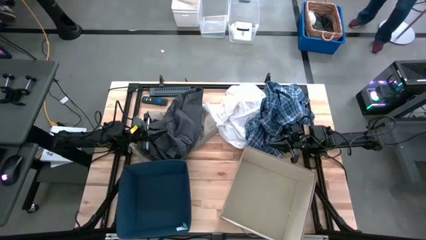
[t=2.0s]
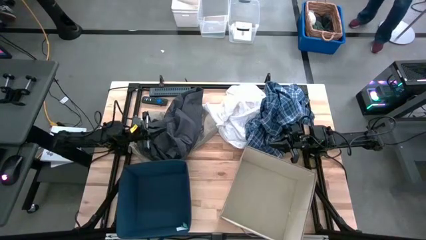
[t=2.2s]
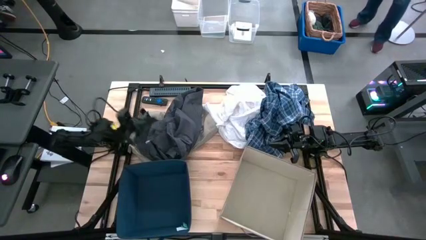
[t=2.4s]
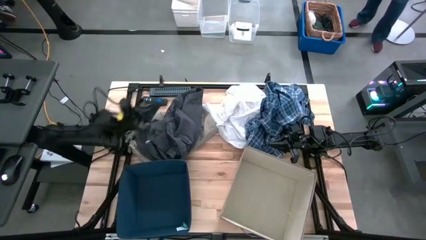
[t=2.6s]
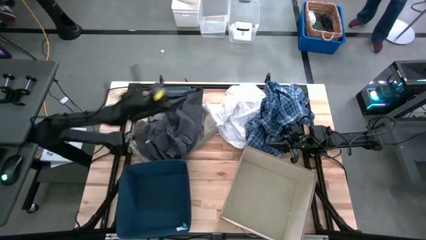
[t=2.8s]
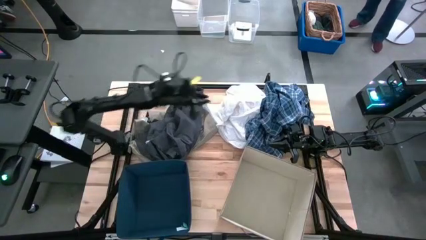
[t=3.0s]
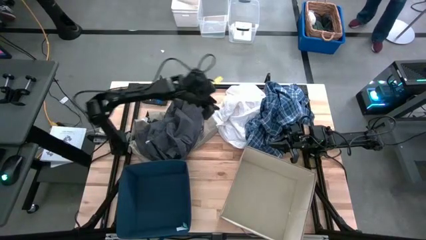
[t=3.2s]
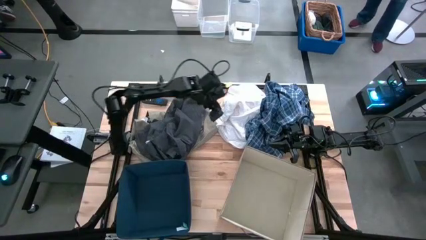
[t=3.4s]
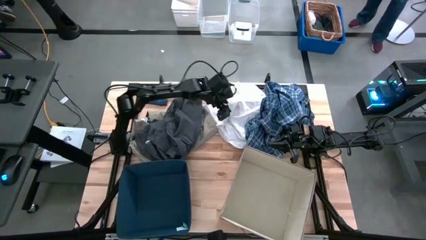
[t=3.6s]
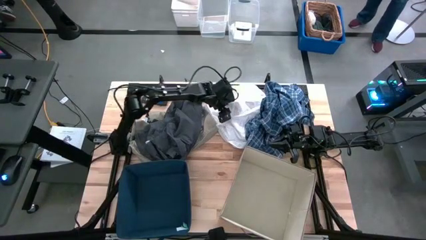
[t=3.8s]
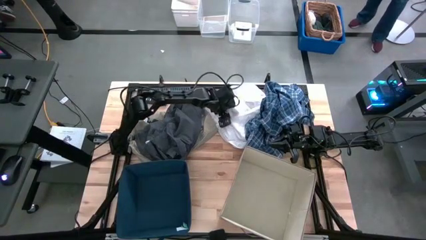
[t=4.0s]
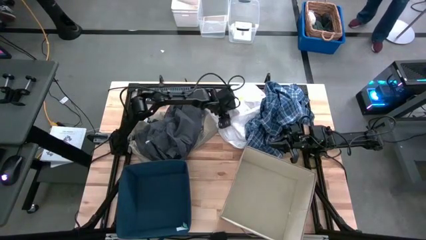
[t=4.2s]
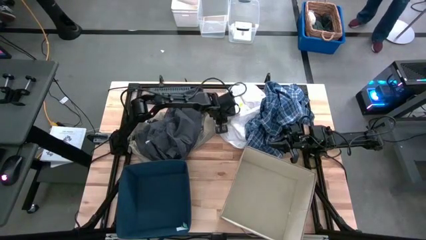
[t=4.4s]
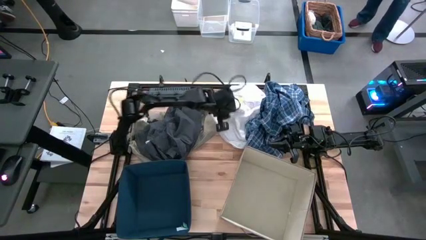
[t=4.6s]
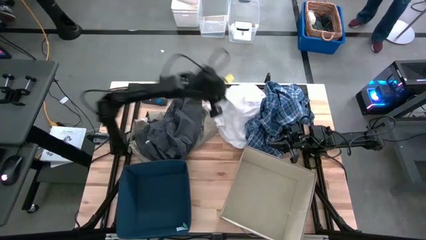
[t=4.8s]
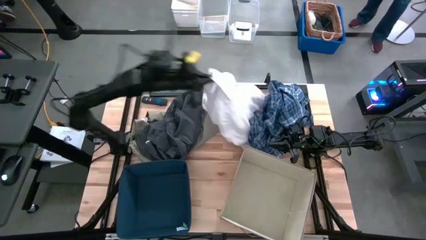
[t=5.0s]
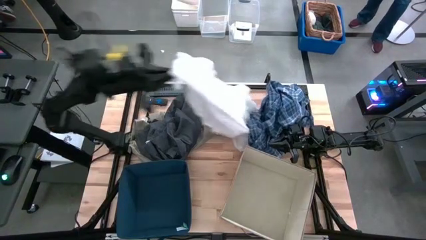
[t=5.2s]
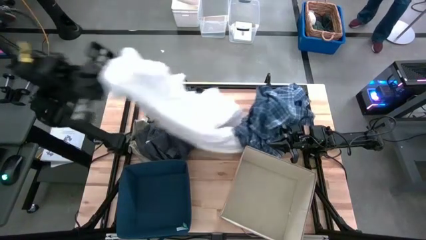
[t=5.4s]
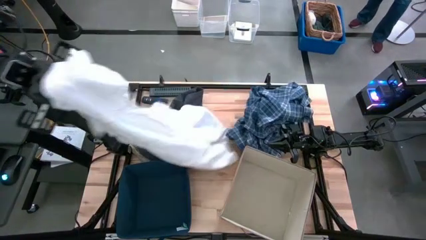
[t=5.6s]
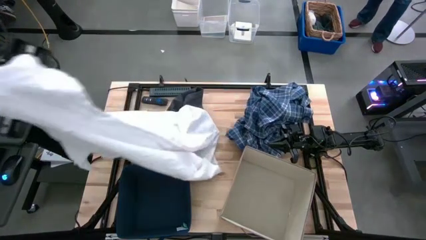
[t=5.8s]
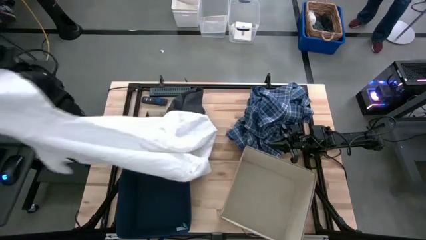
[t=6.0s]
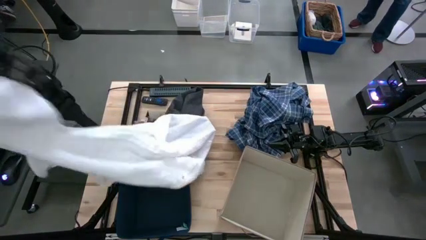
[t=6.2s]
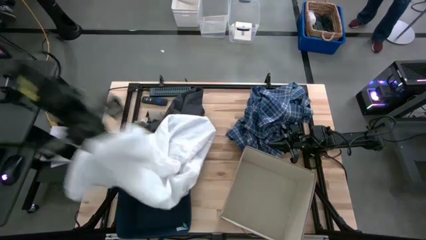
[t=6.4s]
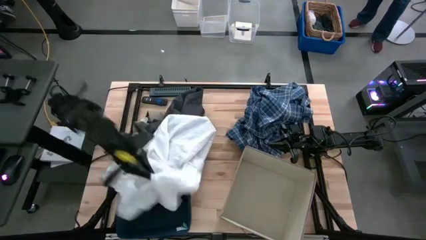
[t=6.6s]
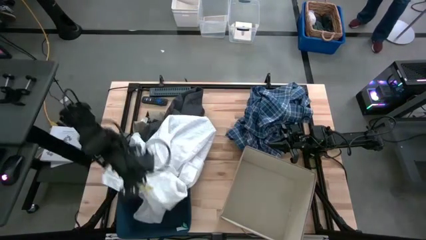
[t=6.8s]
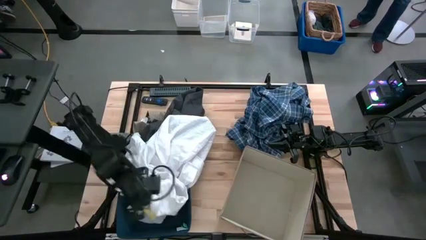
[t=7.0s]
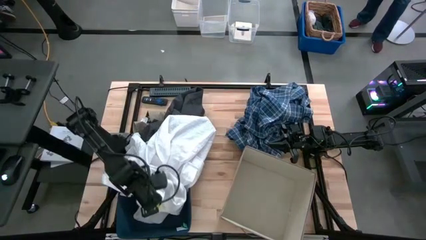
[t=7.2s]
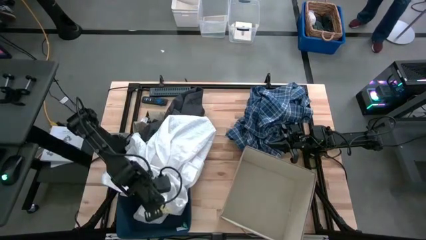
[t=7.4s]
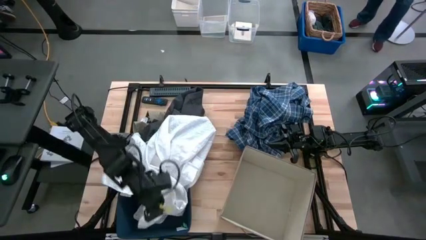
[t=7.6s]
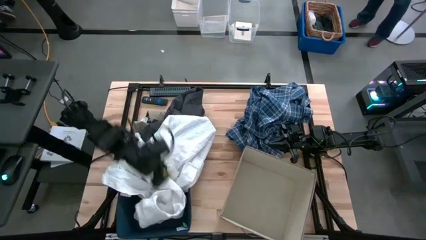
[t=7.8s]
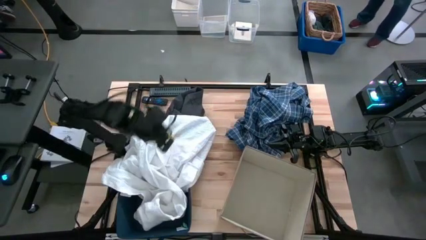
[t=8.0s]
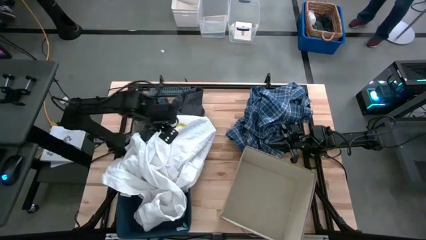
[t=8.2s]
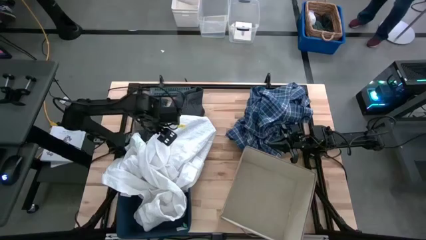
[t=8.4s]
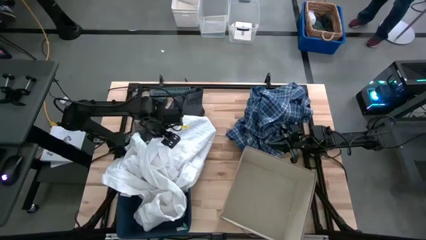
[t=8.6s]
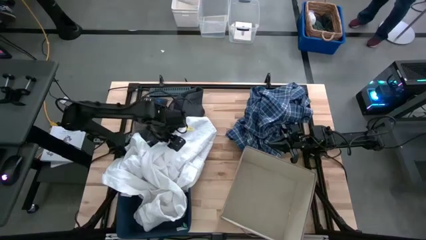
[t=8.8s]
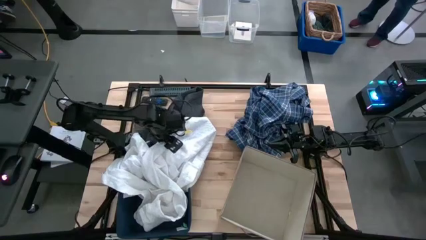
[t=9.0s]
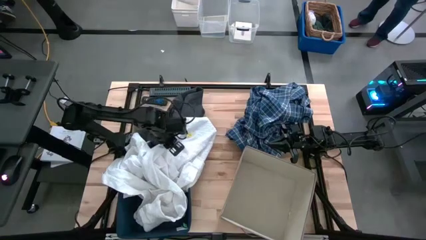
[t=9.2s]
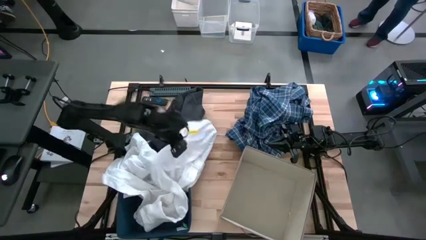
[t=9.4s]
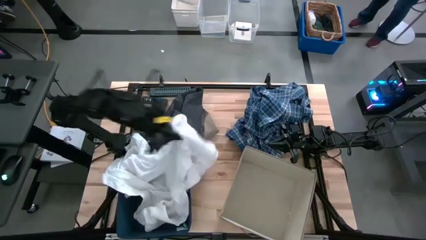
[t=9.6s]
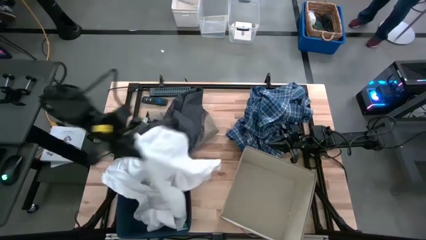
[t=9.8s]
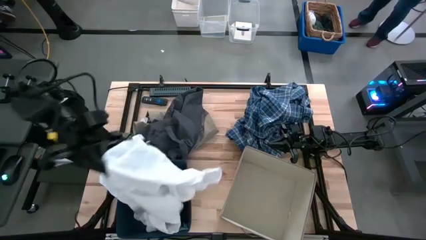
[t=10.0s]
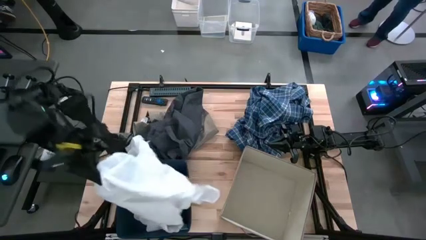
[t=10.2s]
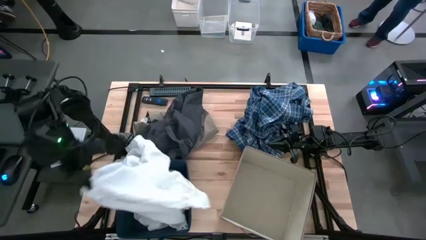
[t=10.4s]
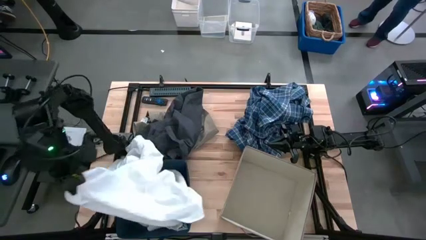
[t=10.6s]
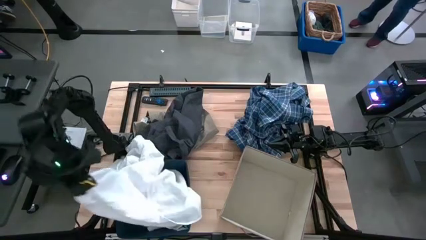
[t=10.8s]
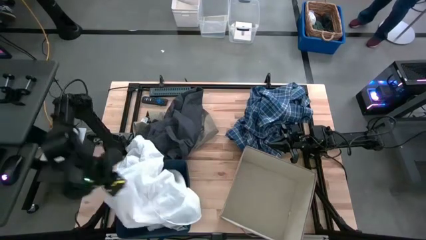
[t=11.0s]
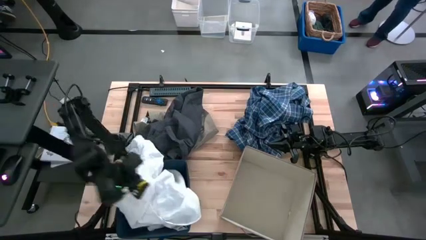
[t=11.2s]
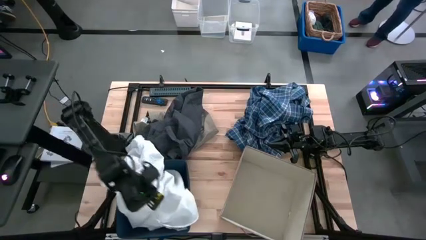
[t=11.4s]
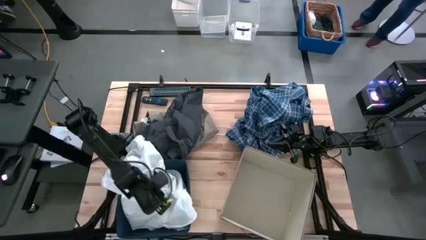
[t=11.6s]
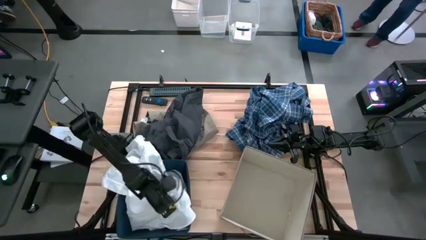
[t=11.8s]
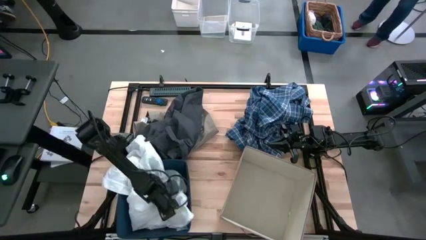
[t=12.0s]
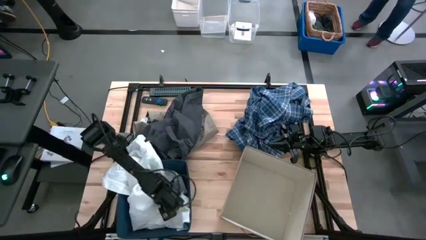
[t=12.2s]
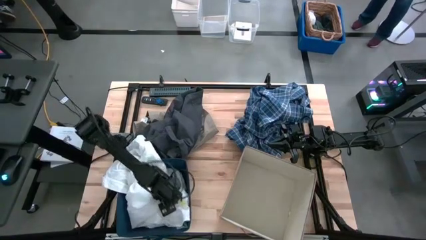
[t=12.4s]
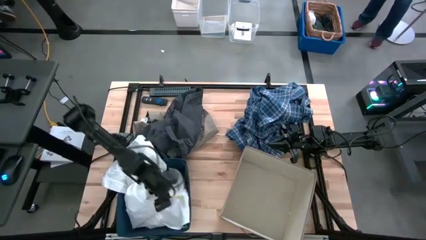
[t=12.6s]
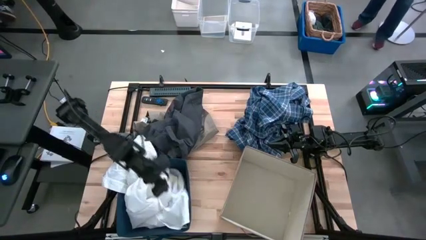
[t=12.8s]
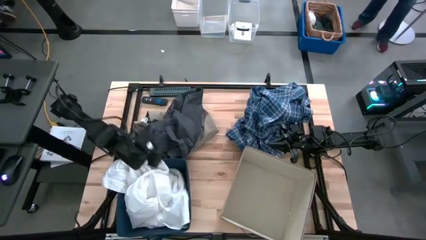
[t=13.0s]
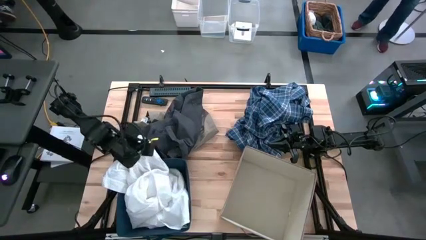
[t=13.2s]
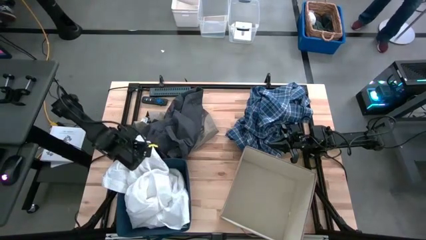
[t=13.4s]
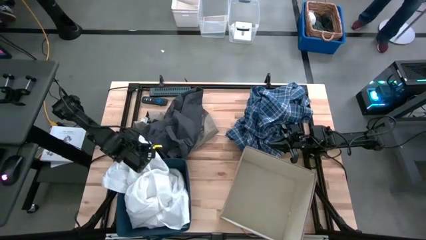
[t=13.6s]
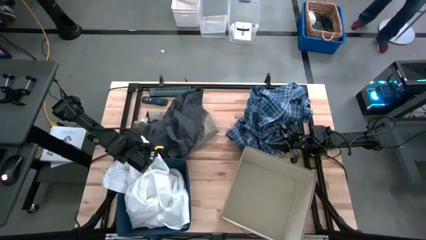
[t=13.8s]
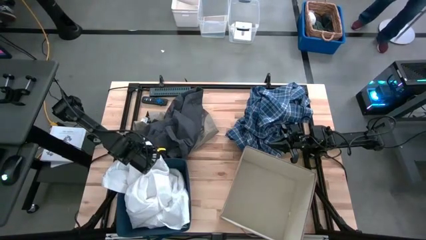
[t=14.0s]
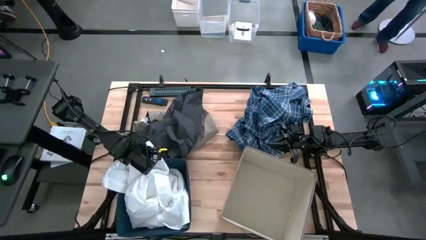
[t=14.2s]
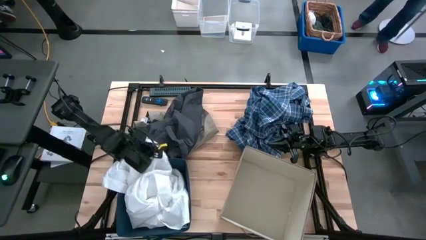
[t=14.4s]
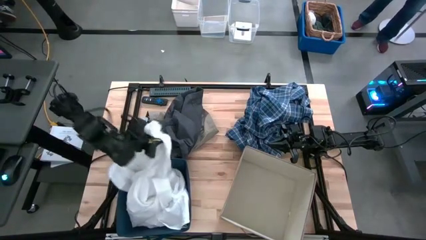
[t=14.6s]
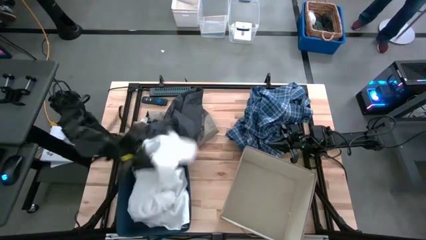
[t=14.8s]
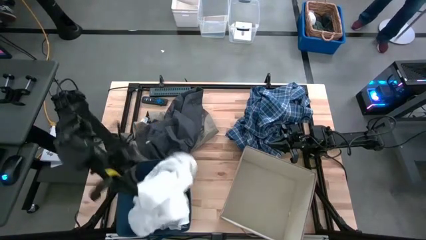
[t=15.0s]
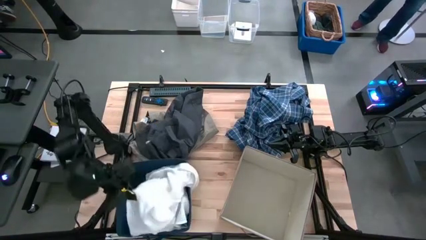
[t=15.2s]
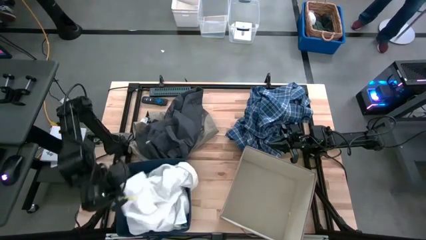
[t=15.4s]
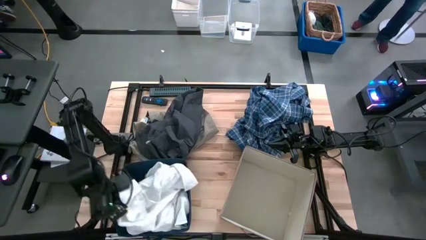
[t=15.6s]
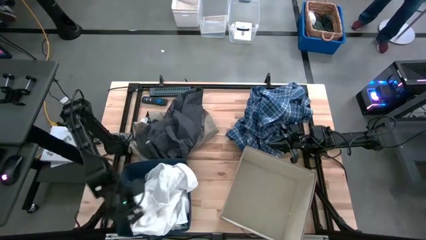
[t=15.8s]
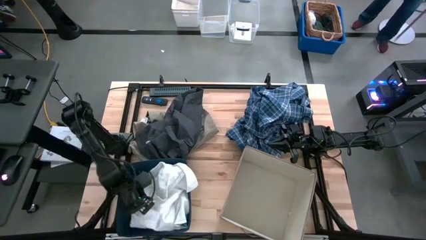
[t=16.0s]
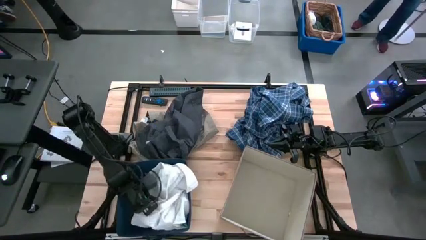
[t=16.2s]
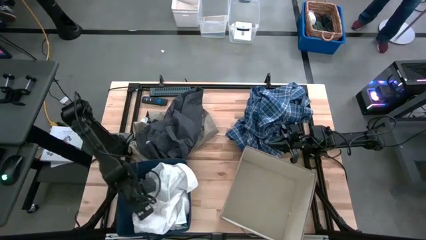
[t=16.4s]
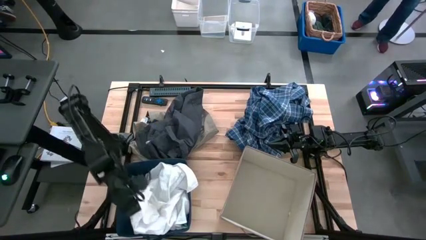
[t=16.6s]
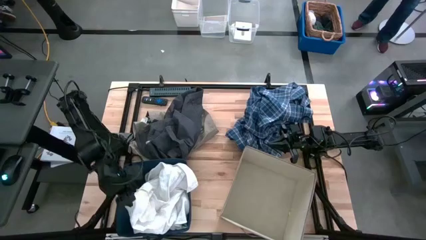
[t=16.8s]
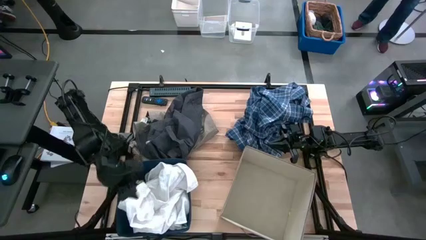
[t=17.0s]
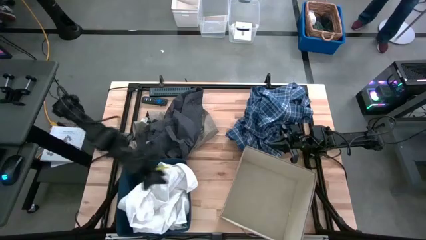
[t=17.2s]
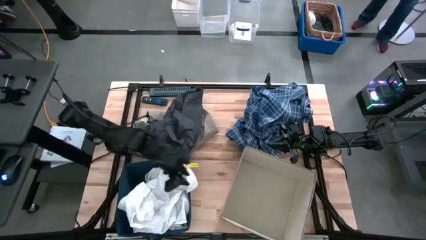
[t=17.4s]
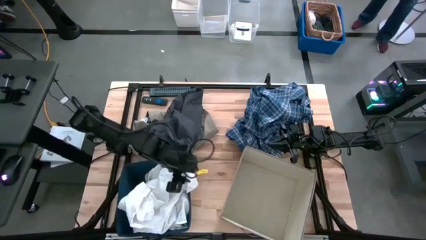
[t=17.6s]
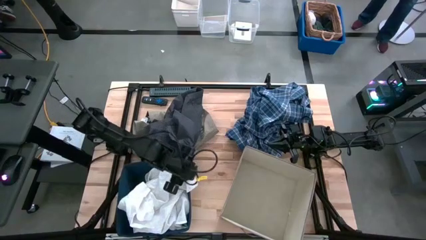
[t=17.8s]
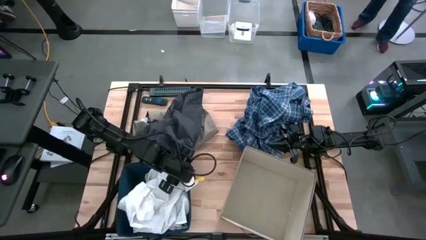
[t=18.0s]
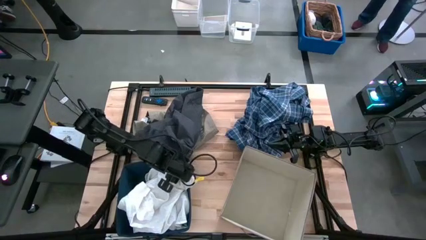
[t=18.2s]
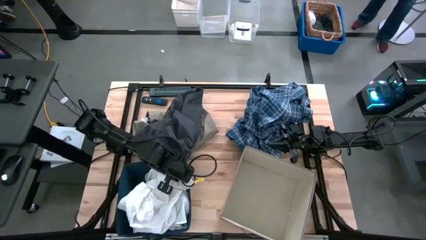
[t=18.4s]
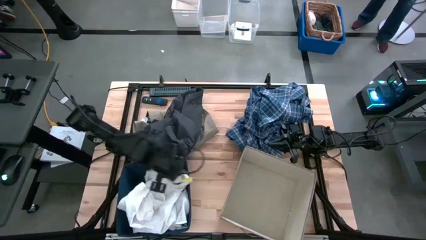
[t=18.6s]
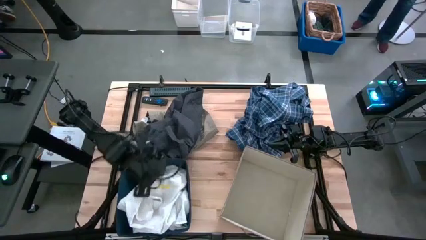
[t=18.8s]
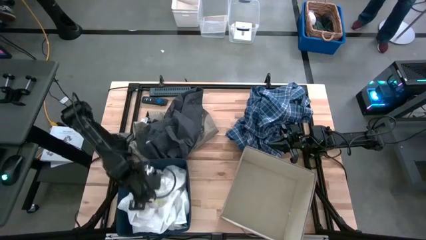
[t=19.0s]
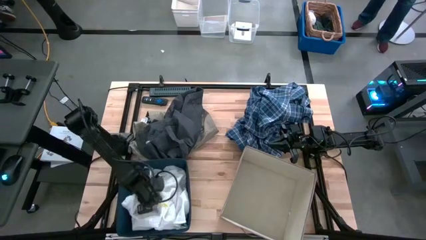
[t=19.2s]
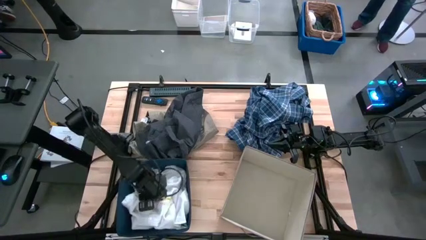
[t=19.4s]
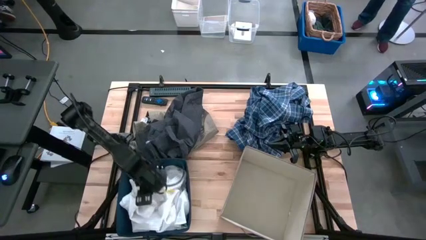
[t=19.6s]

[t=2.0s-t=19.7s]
Task: Sort clothes
Put the white shirt into the blue bin
